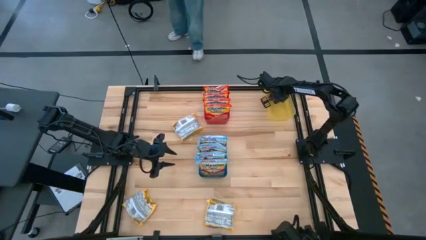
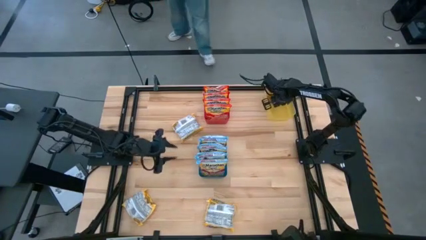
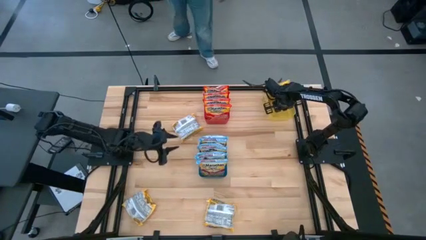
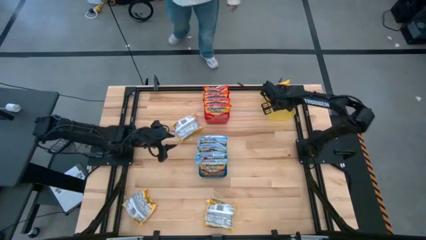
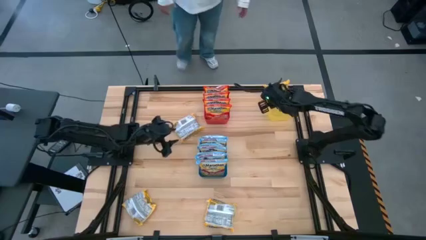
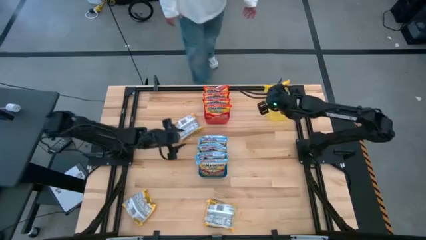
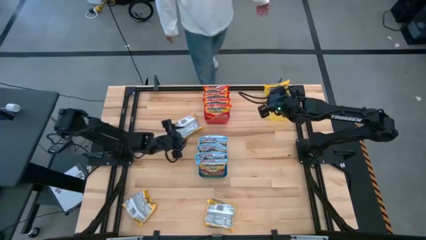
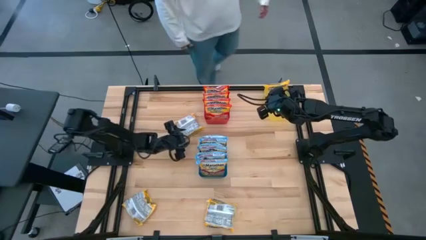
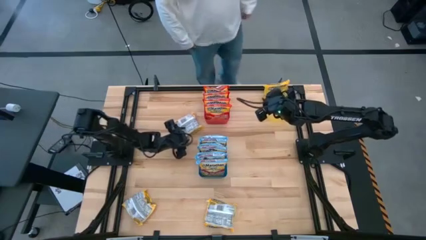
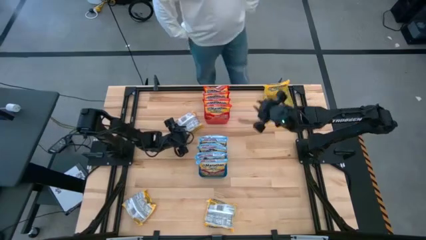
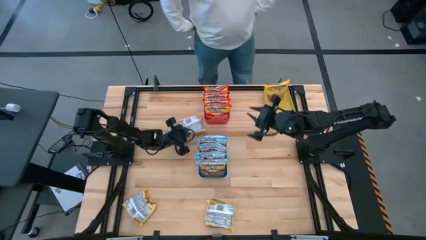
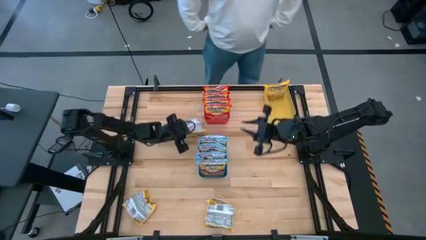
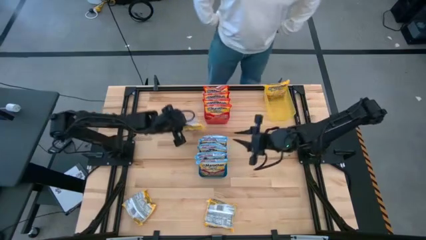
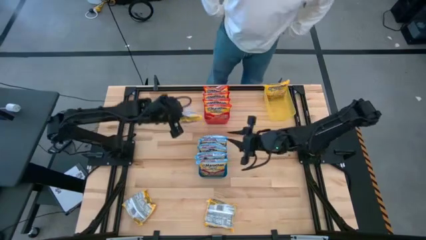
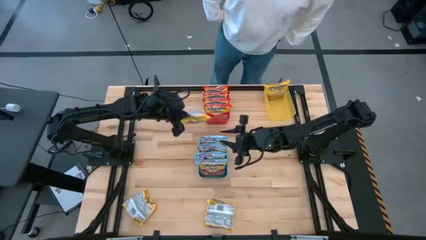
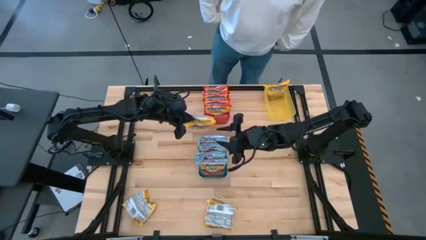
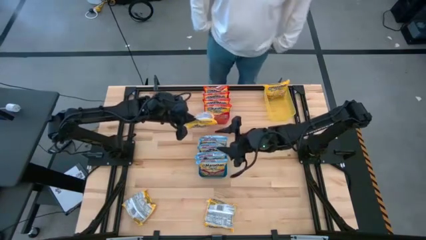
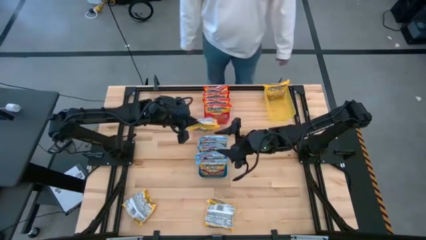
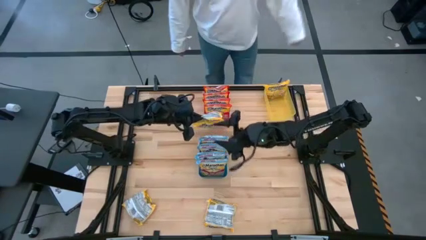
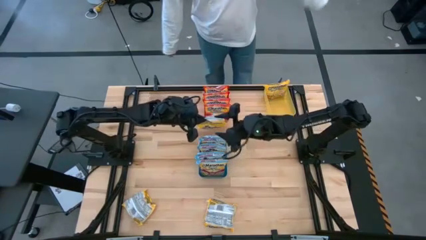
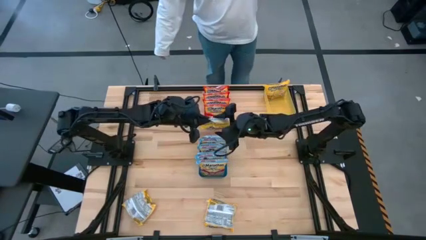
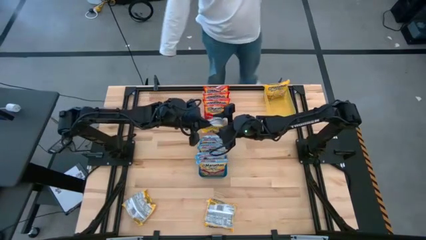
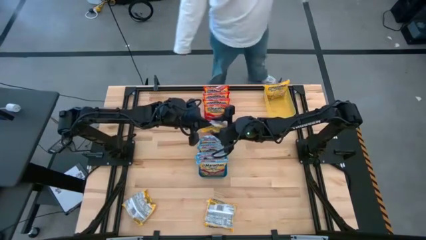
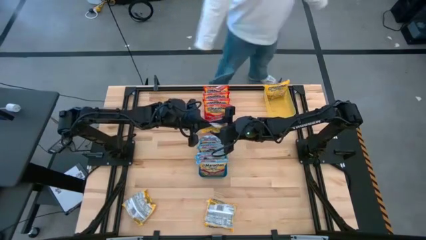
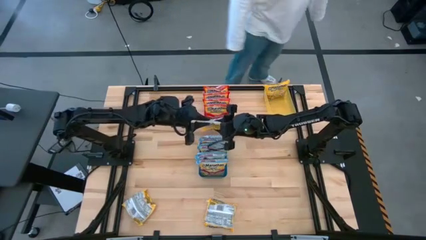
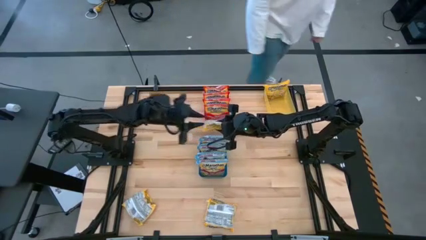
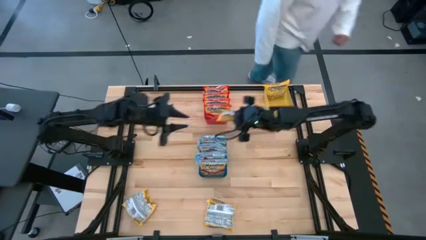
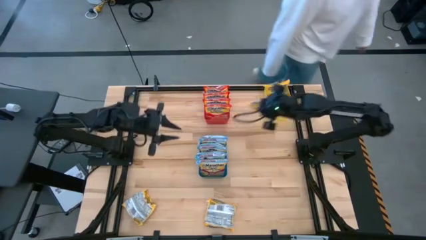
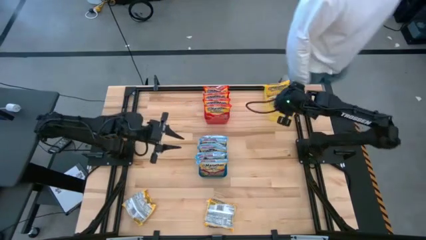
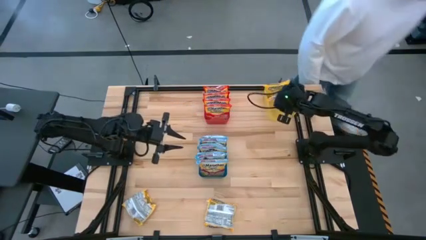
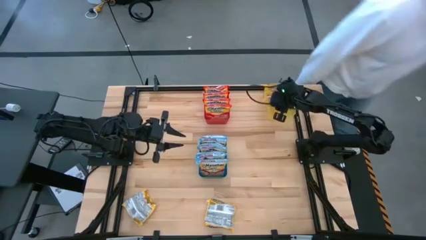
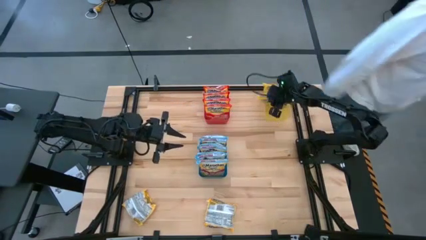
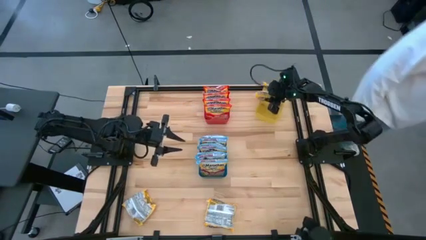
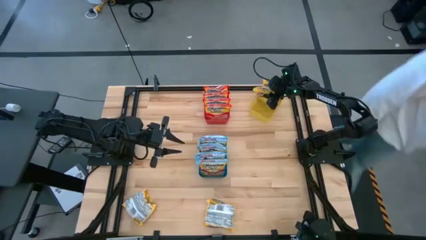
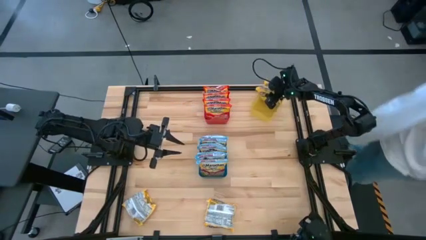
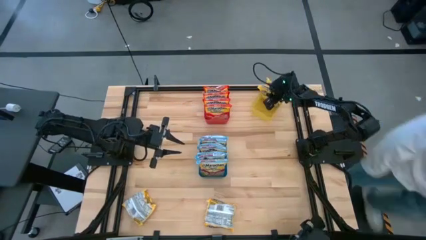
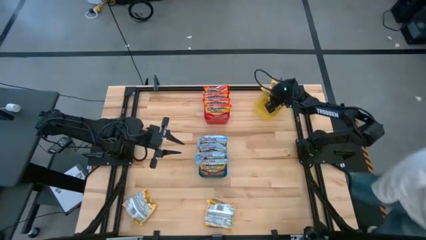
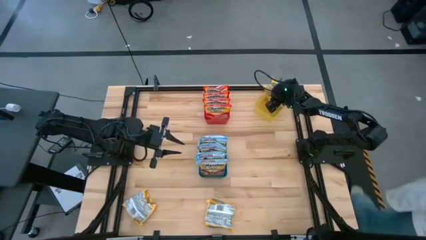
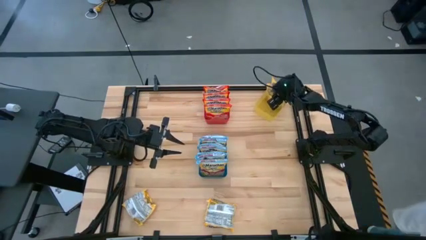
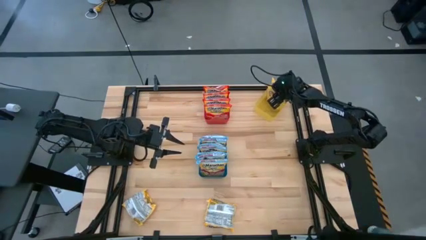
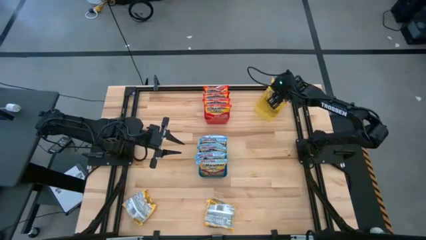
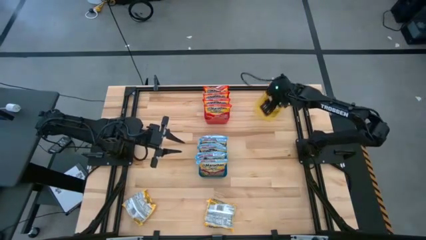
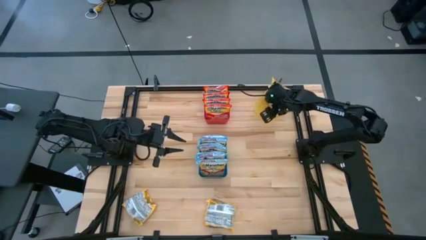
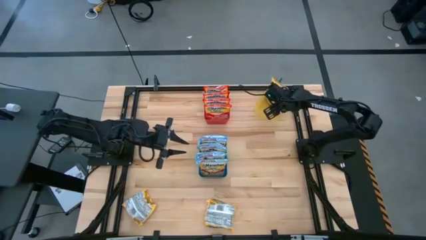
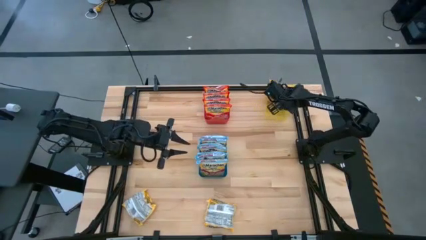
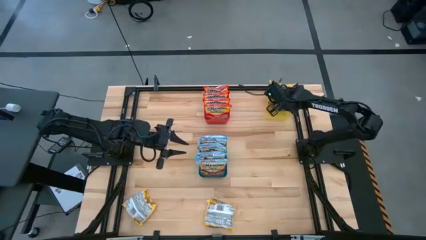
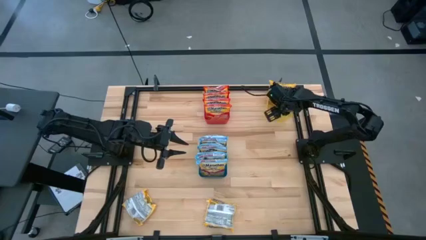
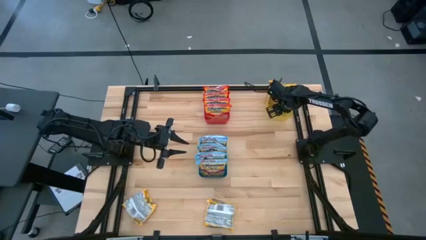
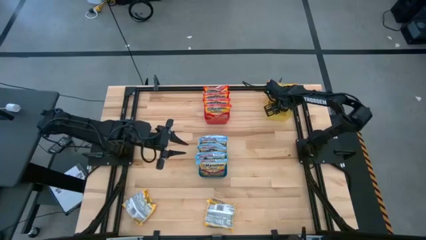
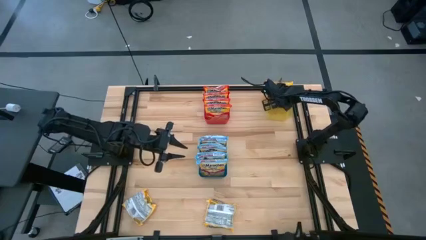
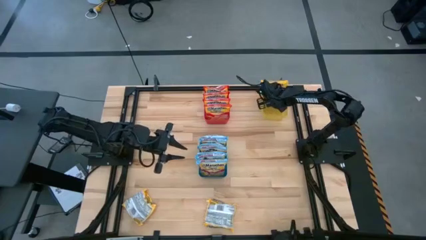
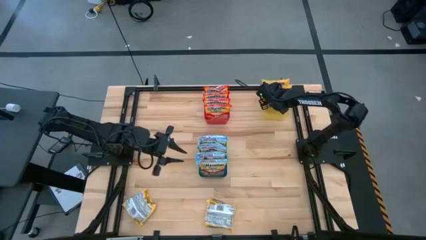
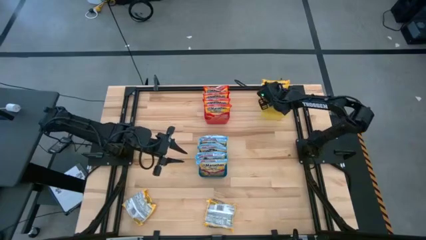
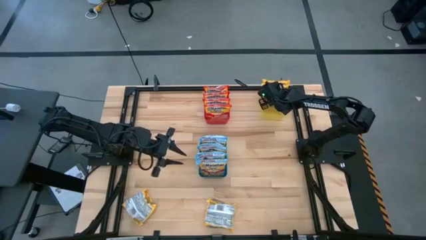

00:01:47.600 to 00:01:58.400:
Task: Sort Maruchan noodles
Put the yellow noodle pack into the yellow bin

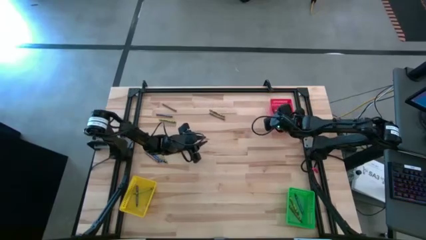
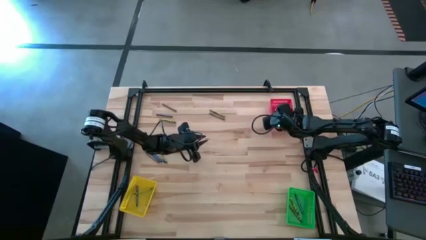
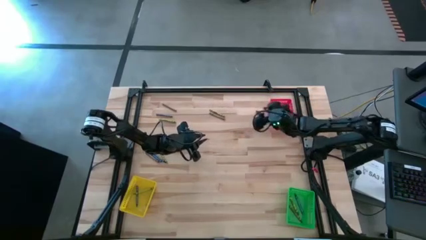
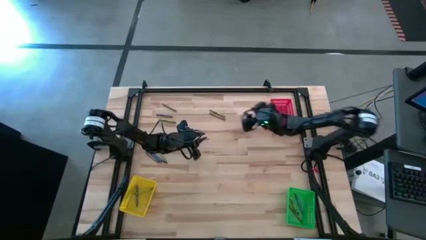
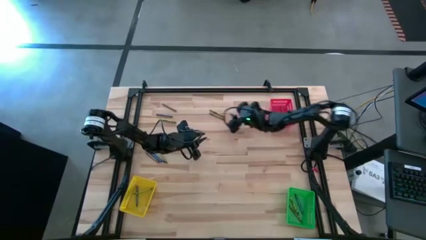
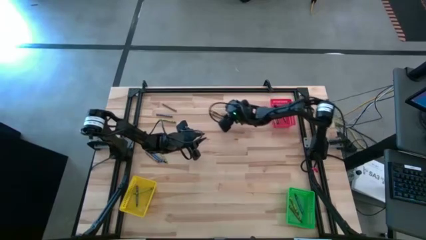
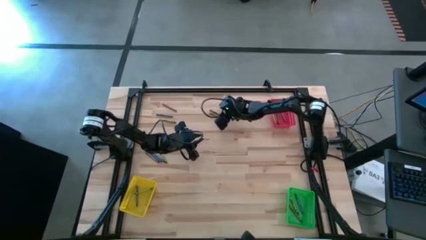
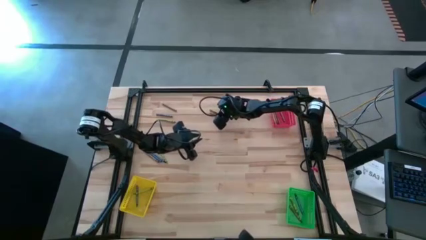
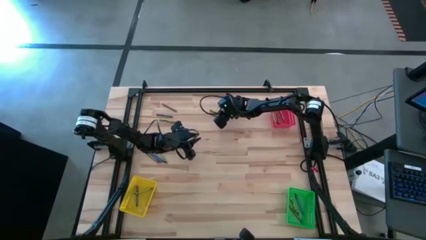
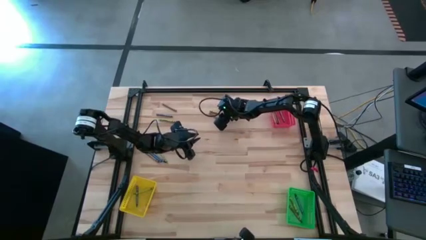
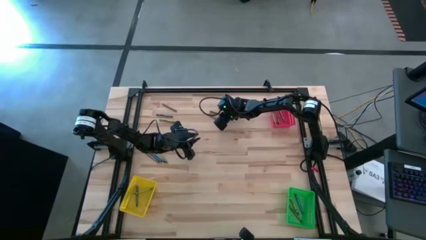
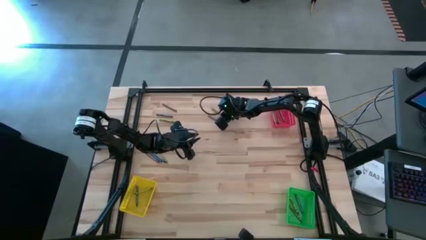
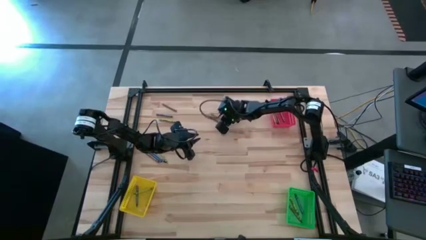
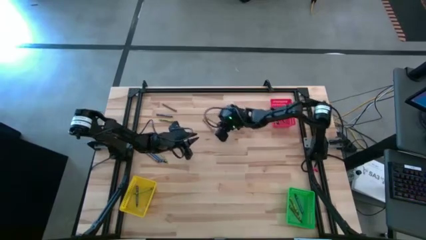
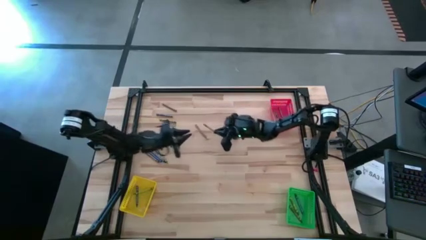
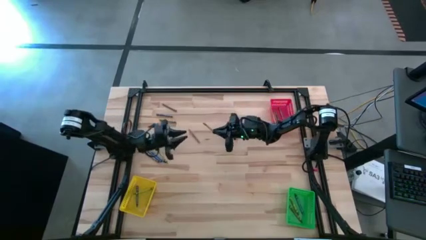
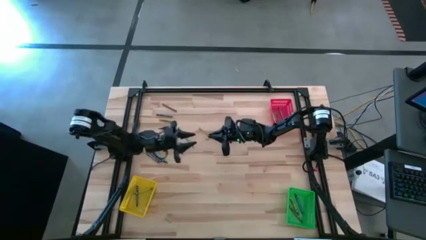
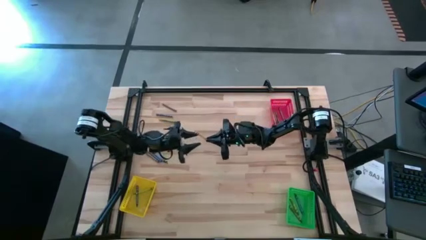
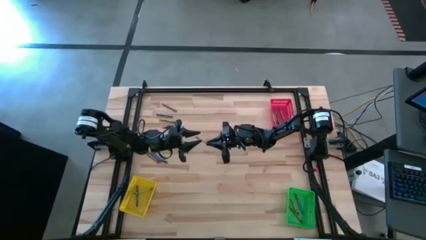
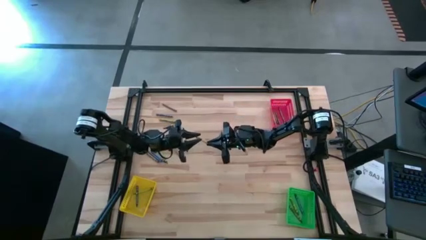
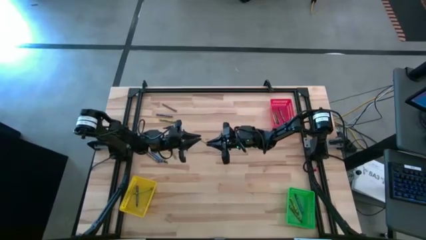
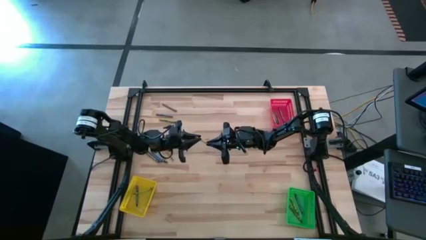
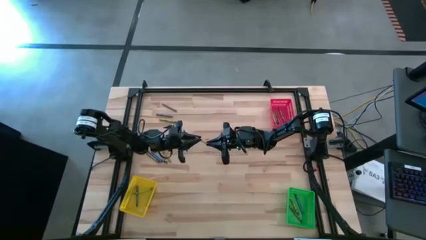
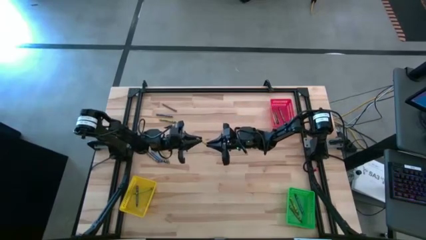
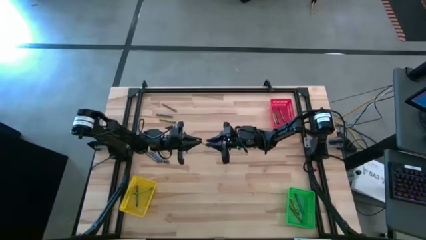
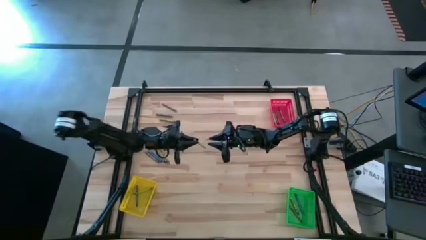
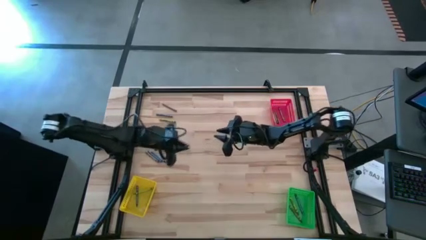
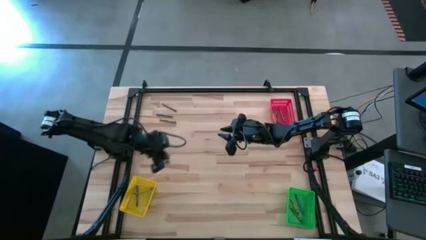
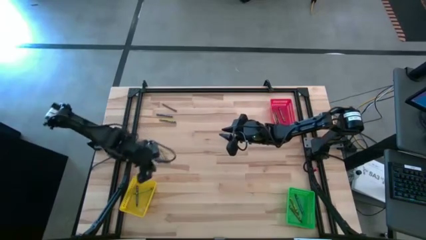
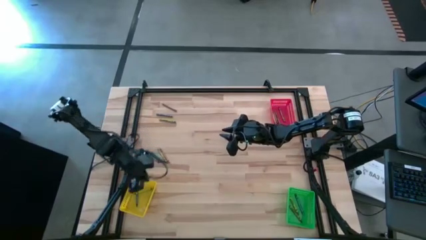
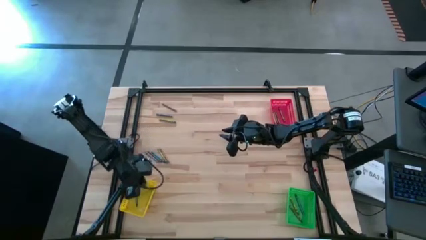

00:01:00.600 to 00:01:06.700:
Task: Sort crayons
Put the green crayon into the yellow bin
